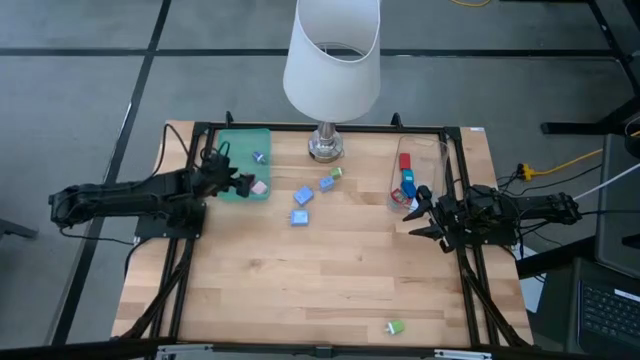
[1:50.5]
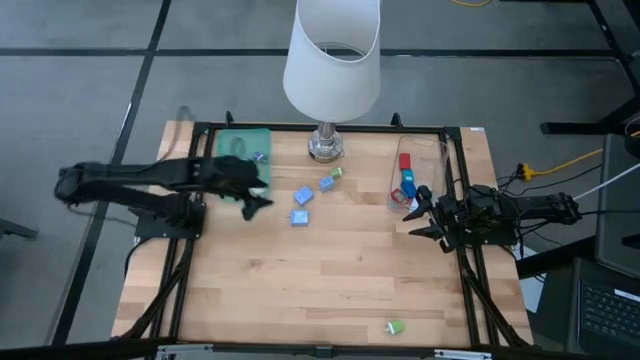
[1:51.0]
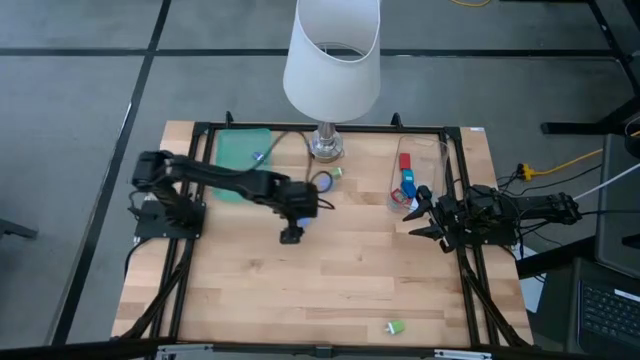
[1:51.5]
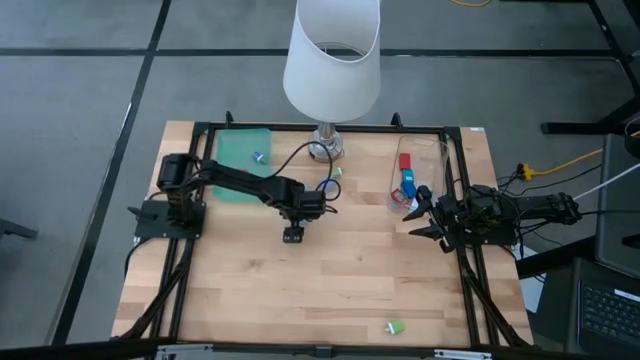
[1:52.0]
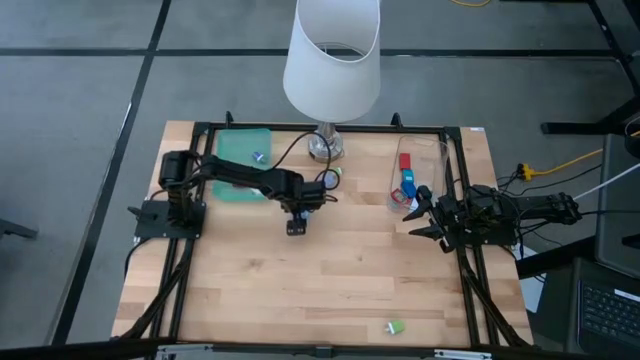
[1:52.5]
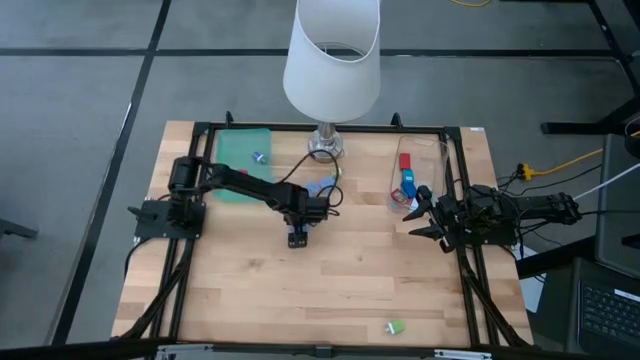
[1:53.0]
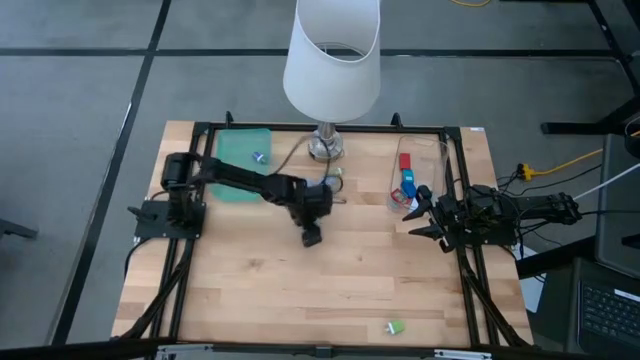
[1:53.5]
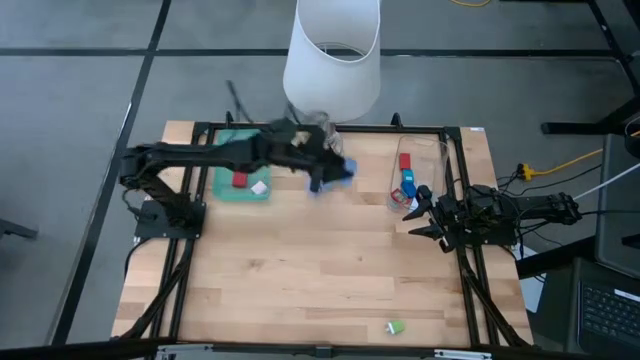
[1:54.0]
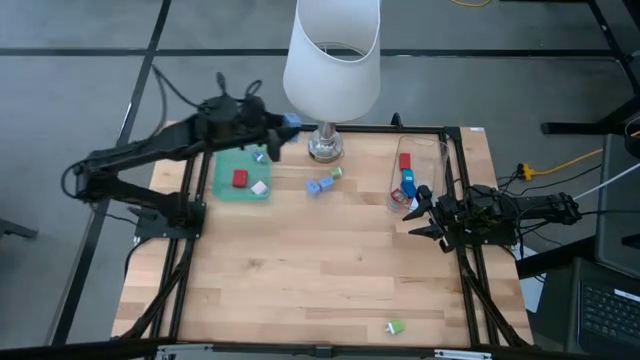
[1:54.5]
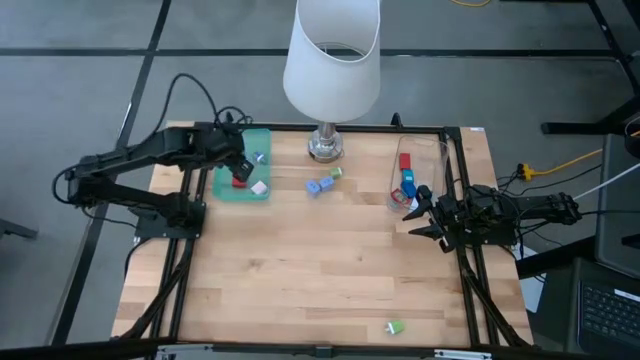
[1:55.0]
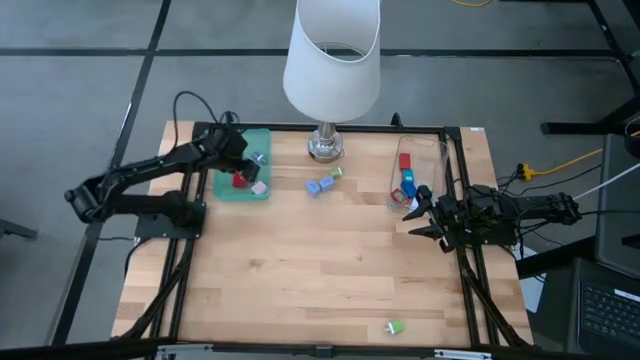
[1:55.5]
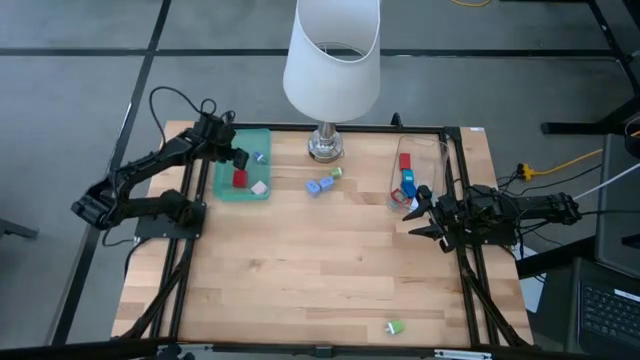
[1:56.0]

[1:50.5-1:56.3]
Task: Pick & Place Office items
Put the purple charger adapter into the green bin

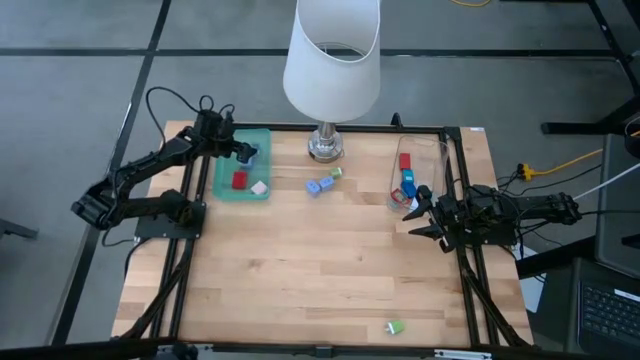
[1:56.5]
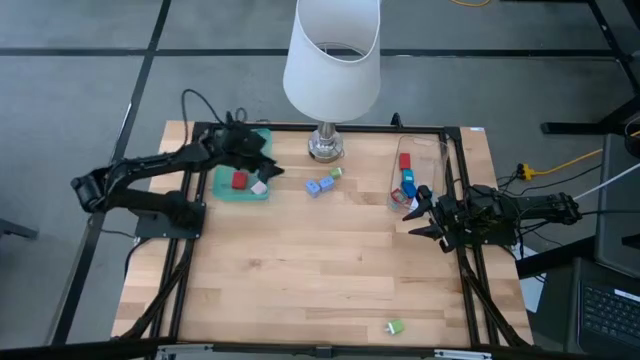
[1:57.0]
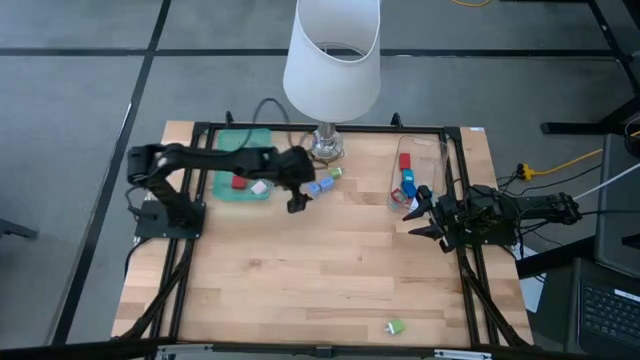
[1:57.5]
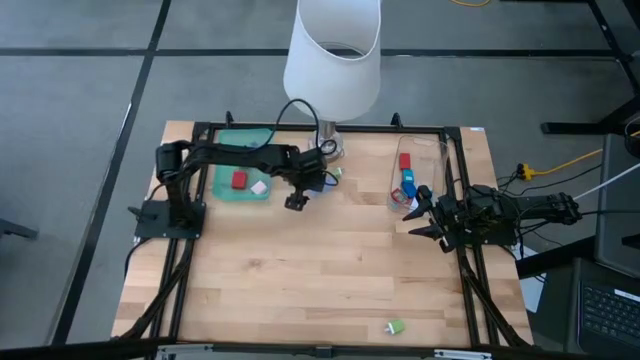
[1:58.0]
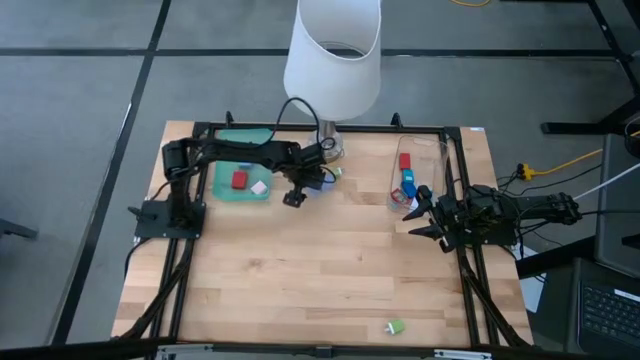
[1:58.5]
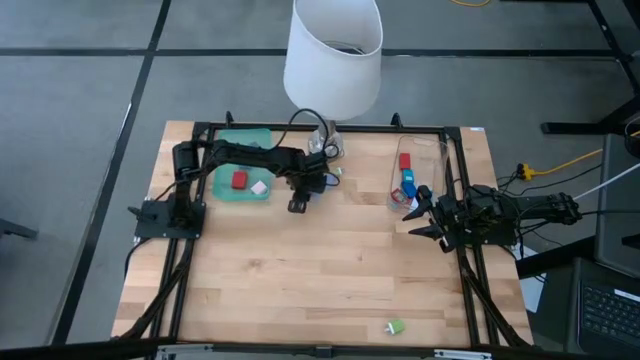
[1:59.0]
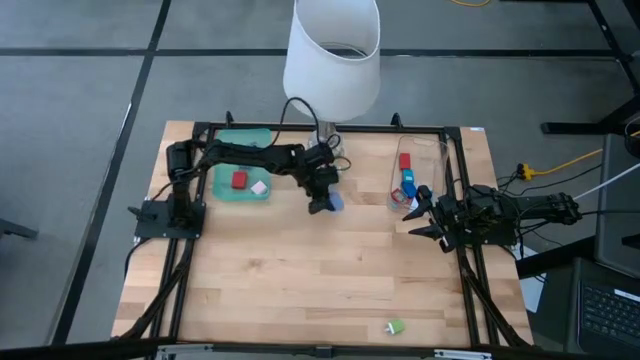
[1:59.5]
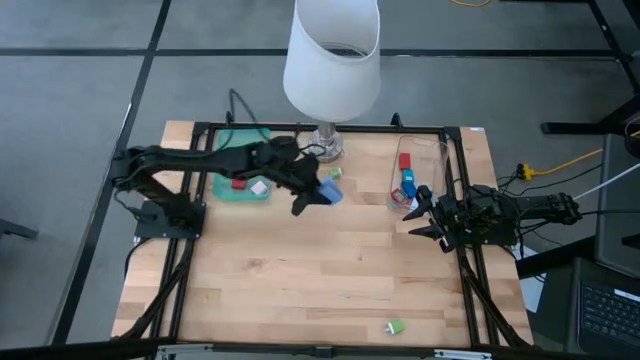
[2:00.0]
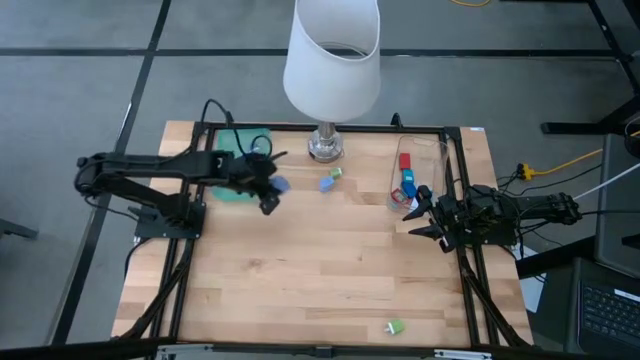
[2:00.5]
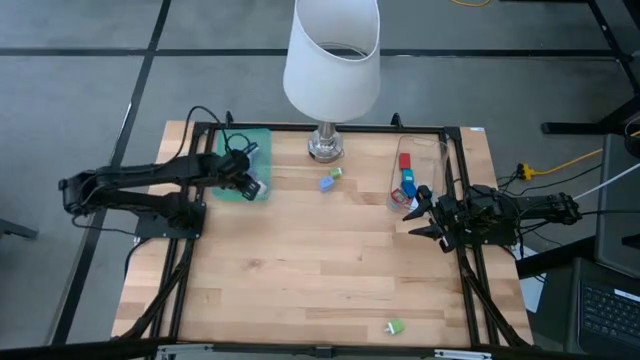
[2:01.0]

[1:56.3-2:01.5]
Put the purple charger adapter into the green bin

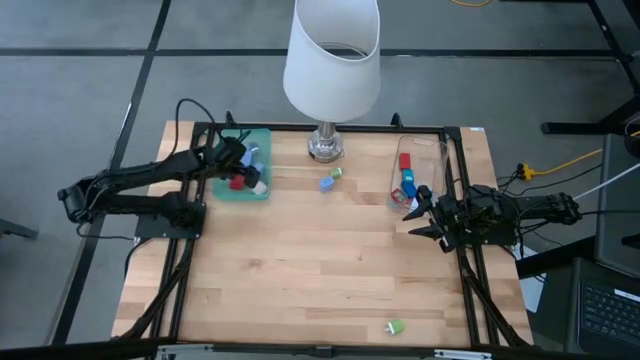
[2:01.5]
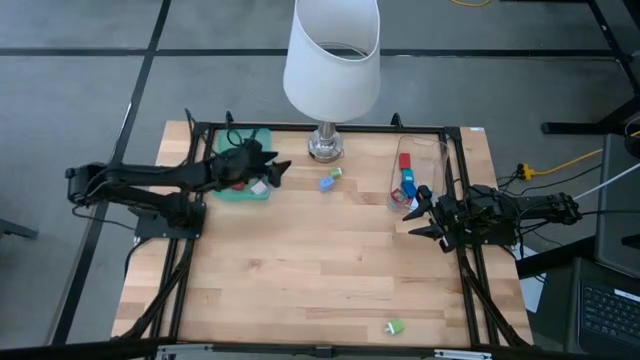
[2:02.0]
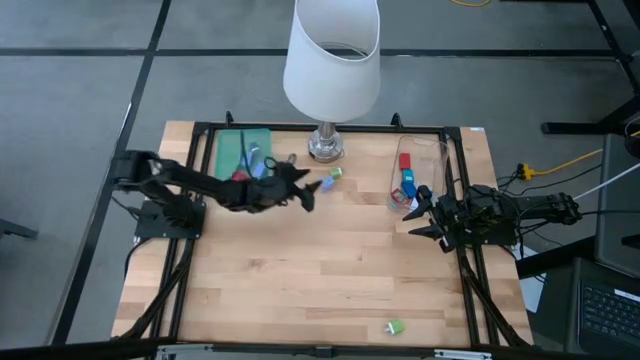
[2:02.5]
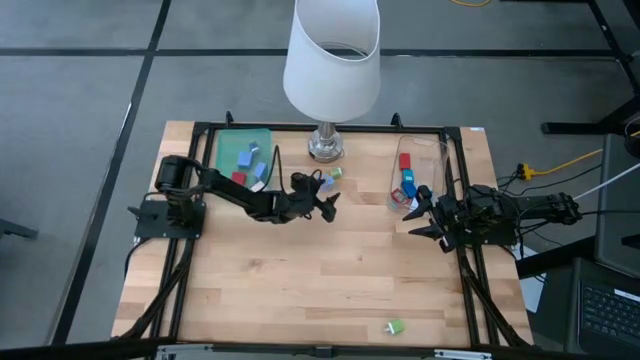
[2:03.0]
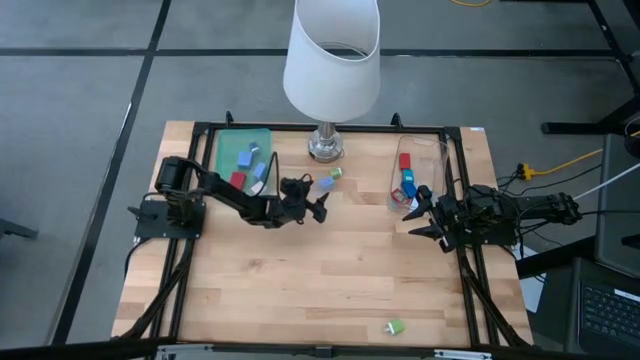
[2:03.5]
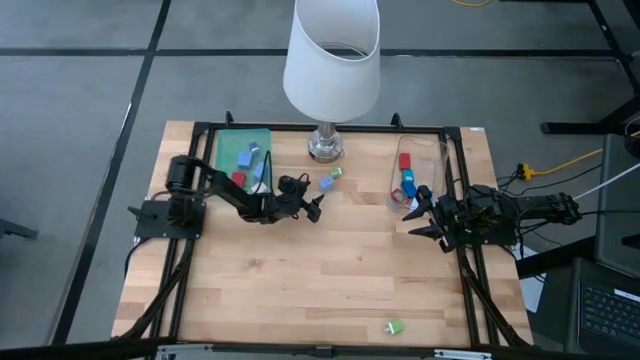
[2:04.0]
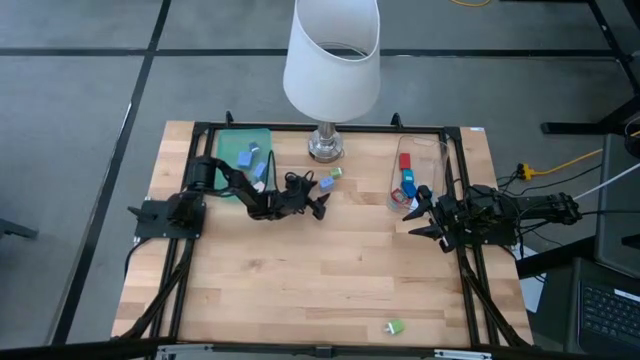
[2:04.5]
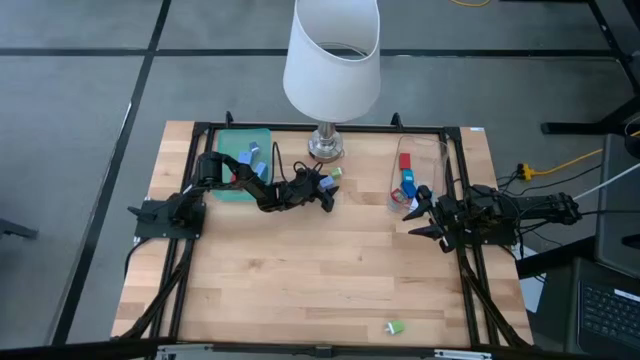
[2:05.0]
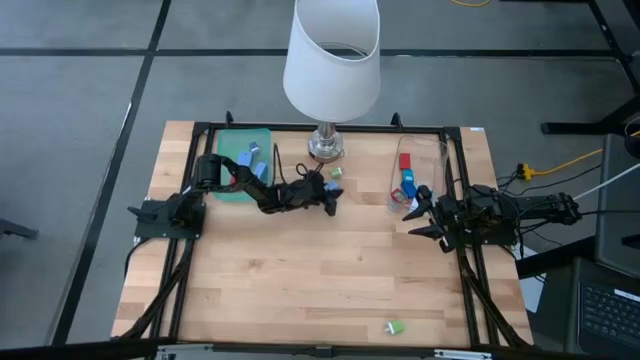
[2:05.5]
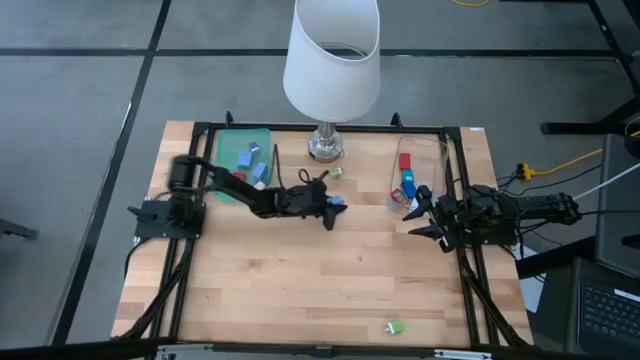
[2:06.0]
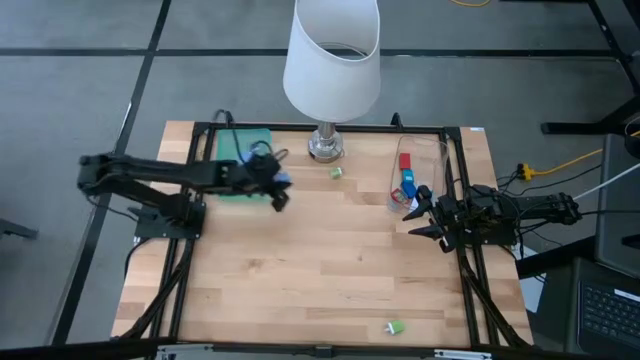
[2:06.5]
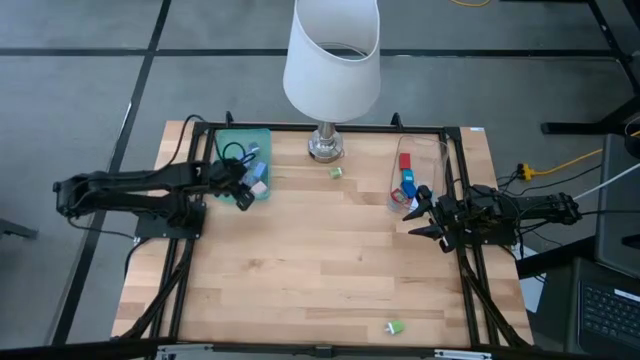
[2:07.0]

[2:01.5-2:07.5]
Put the purple charger adapter into the green bin

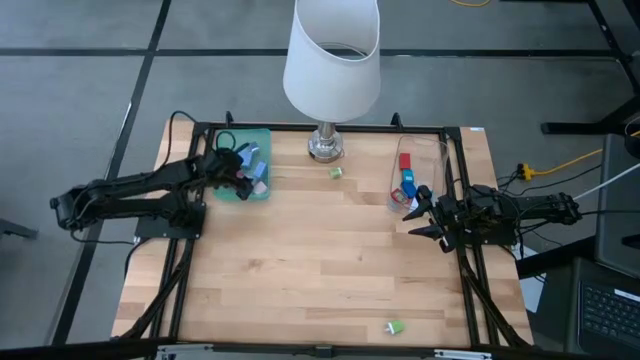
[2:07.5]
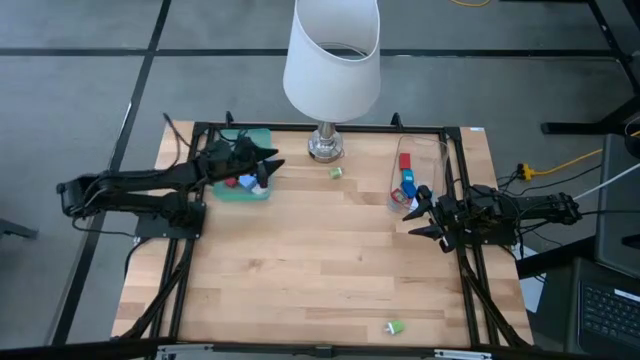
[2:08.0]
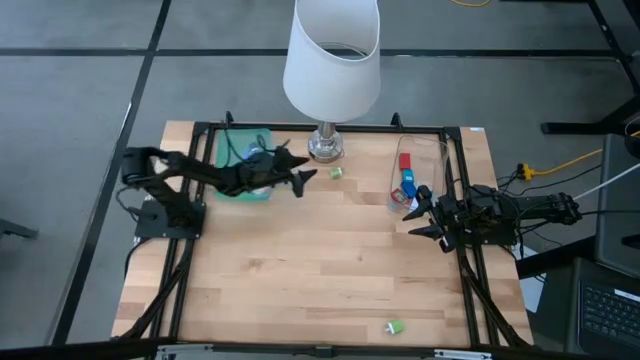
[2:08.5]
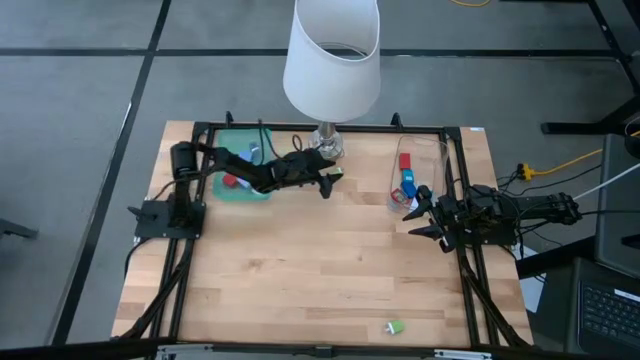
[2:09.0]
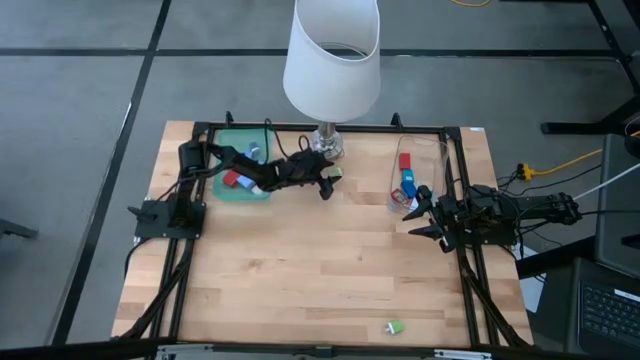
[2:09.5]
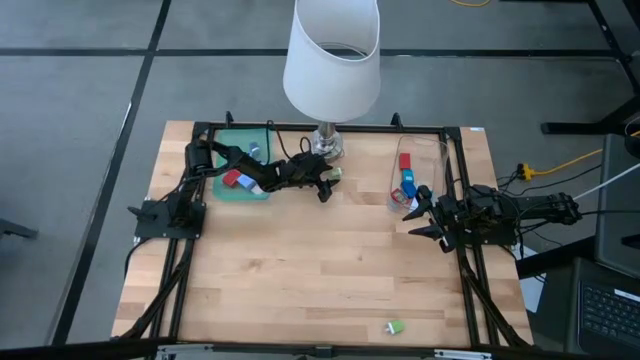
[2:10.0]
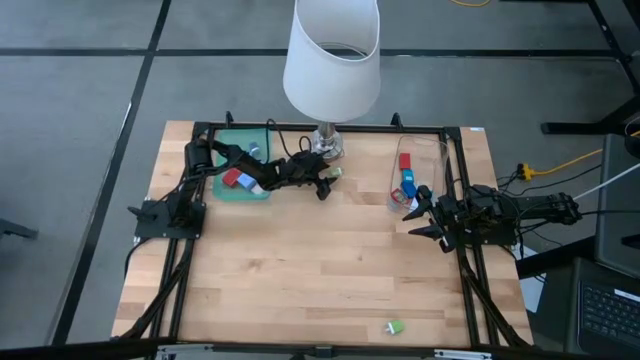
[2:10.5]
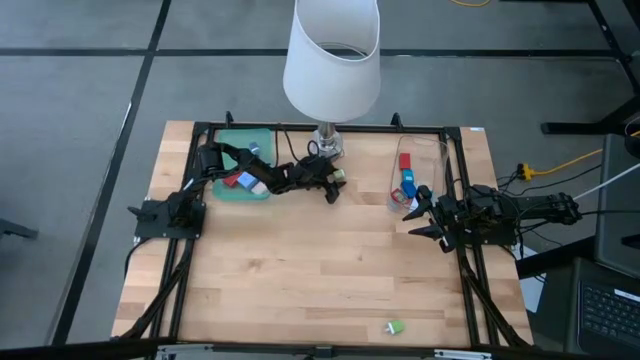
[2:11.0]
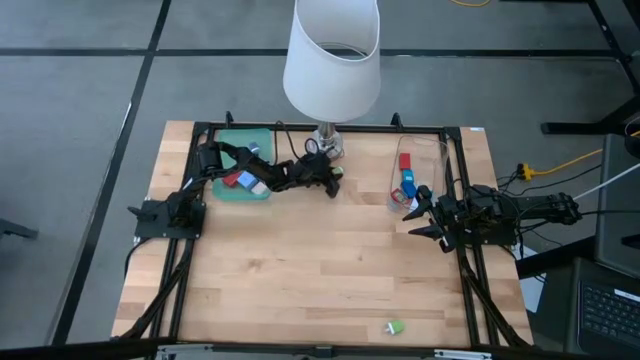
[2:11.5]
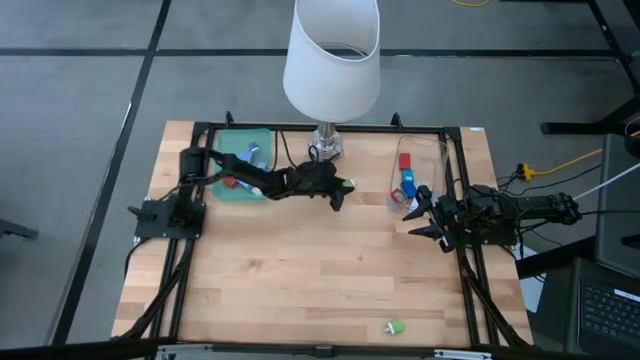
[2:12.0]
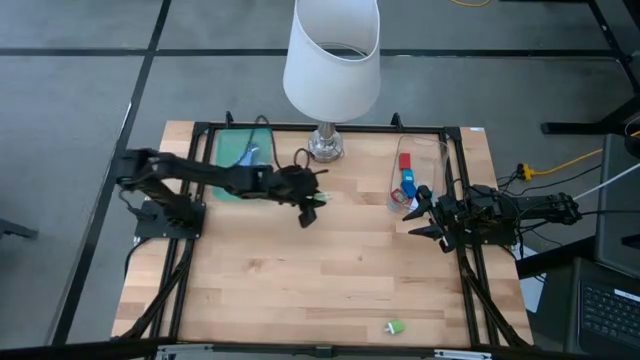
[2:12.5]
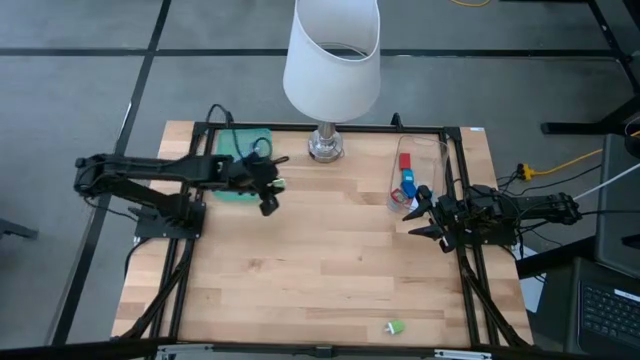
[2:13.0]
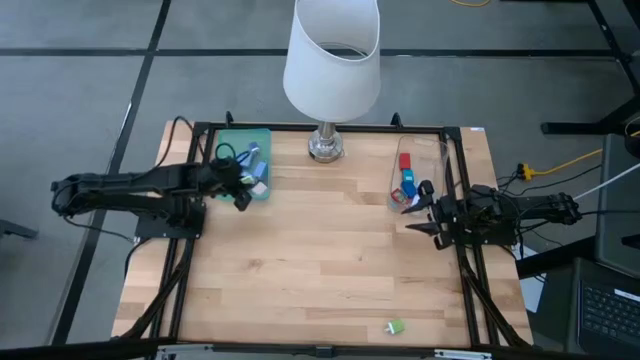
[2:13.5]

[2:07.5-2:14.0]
Put the green charger adapter into the green bin
